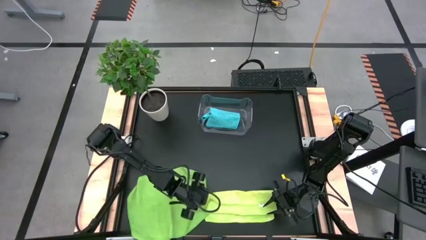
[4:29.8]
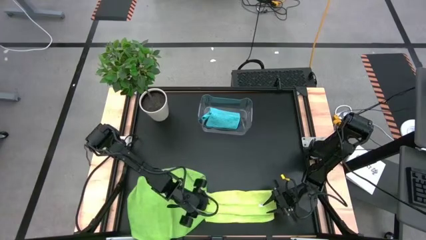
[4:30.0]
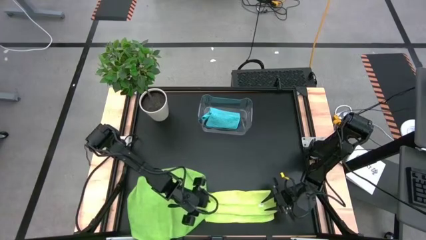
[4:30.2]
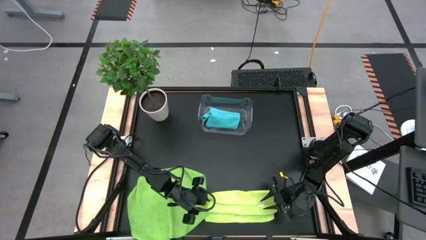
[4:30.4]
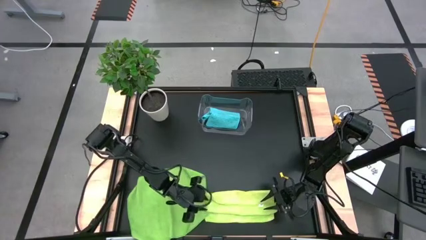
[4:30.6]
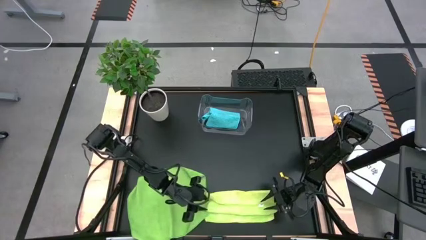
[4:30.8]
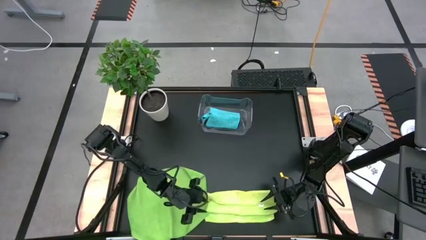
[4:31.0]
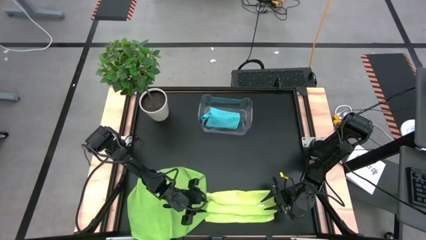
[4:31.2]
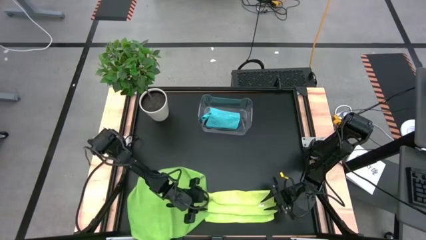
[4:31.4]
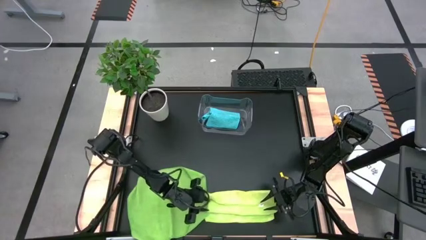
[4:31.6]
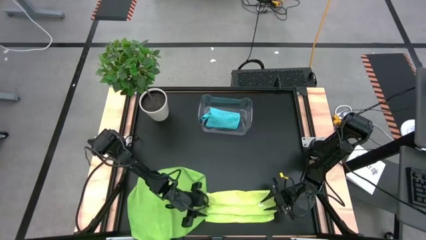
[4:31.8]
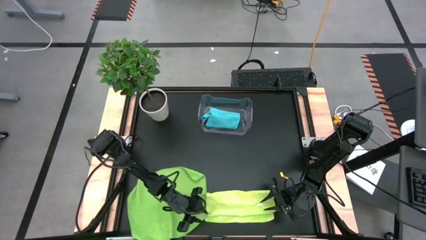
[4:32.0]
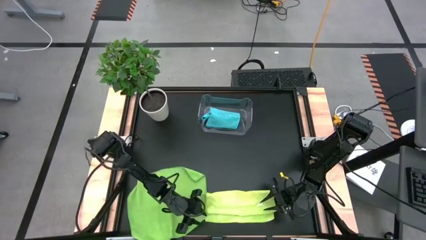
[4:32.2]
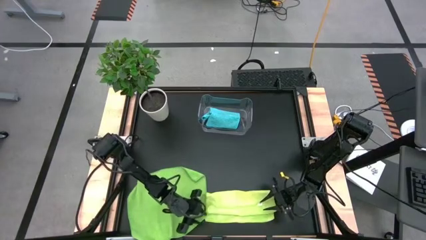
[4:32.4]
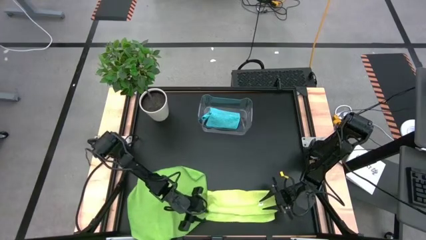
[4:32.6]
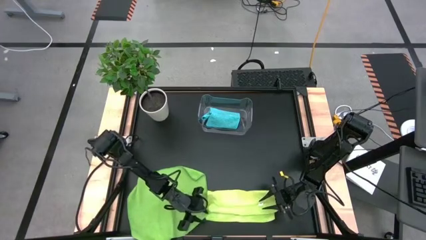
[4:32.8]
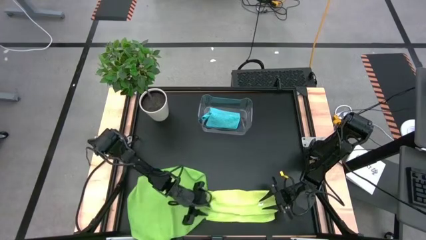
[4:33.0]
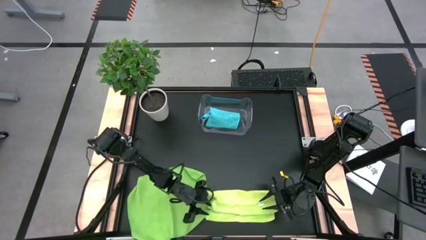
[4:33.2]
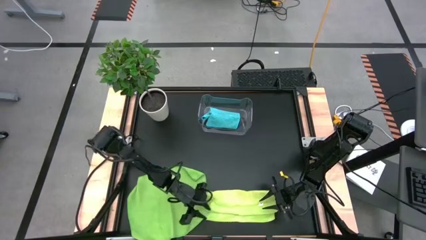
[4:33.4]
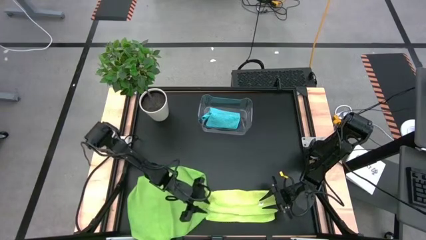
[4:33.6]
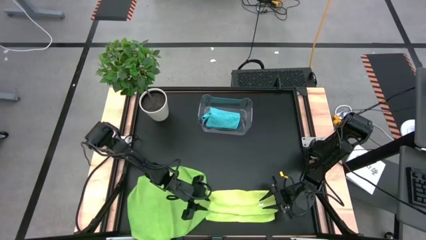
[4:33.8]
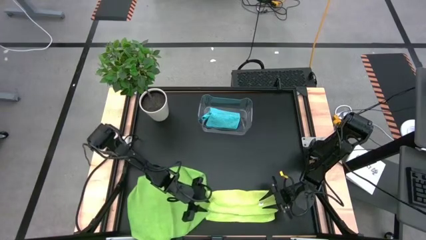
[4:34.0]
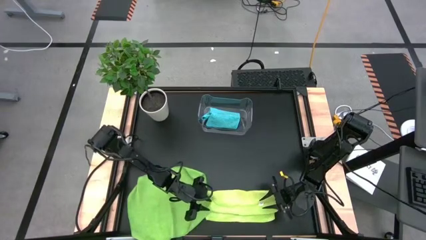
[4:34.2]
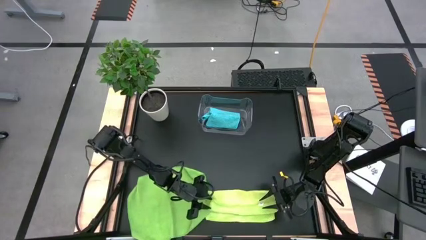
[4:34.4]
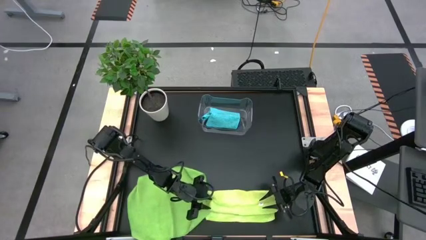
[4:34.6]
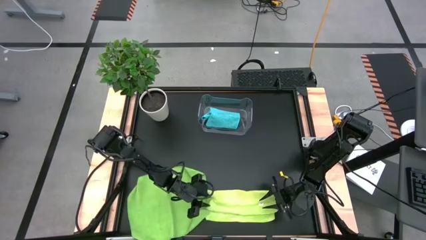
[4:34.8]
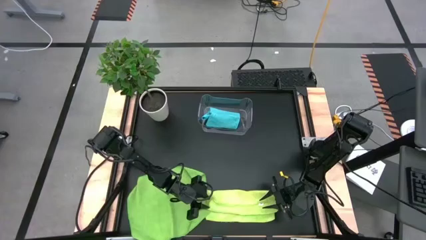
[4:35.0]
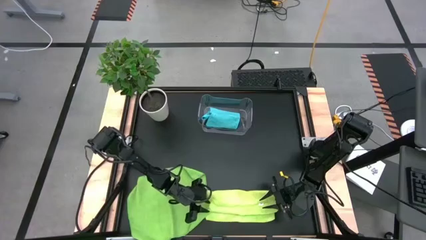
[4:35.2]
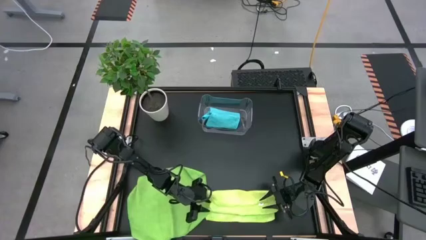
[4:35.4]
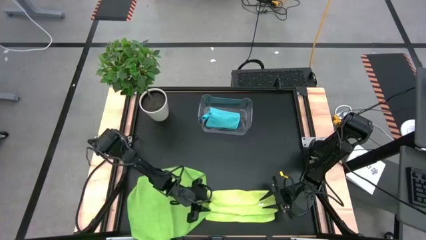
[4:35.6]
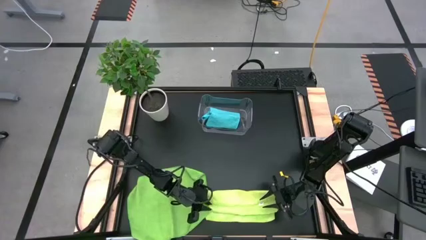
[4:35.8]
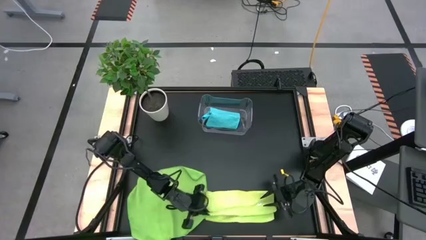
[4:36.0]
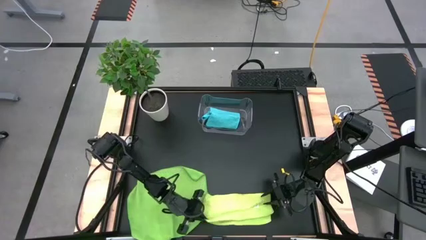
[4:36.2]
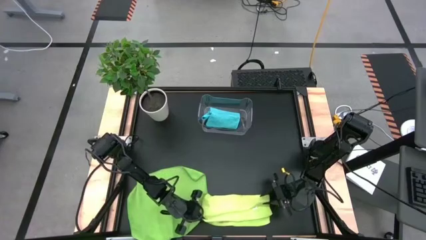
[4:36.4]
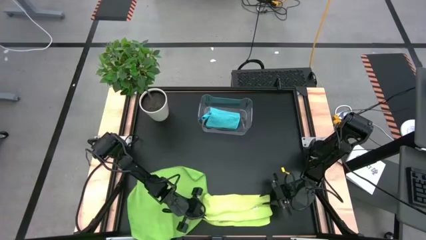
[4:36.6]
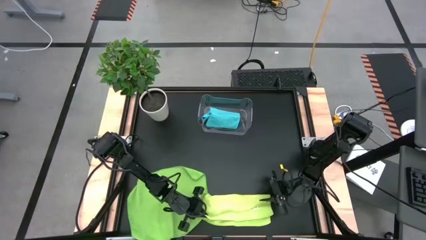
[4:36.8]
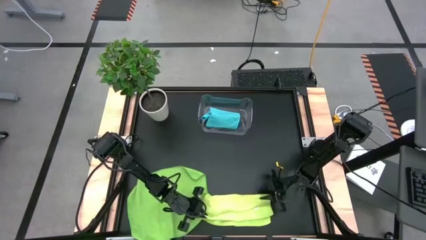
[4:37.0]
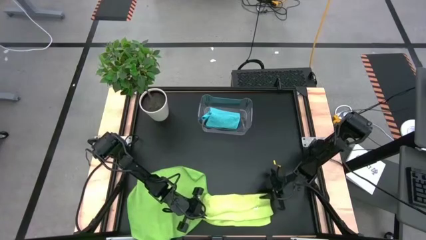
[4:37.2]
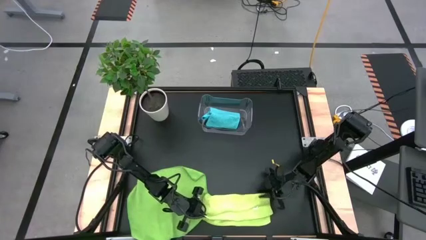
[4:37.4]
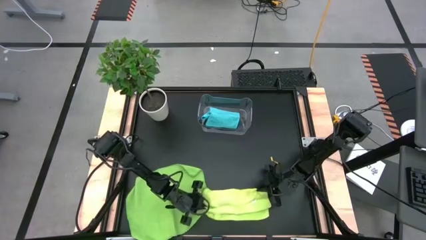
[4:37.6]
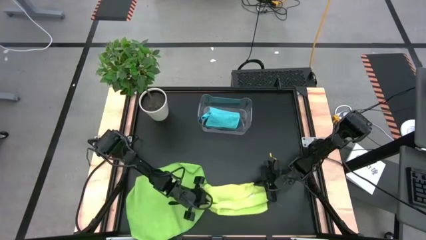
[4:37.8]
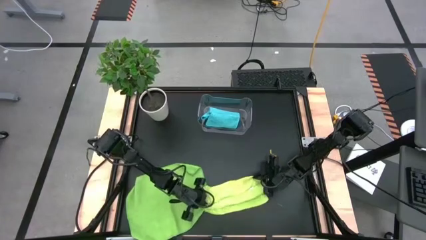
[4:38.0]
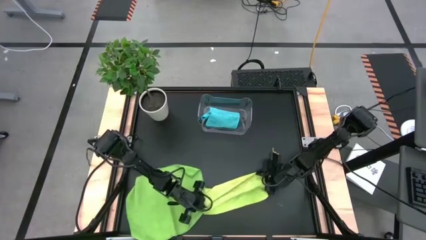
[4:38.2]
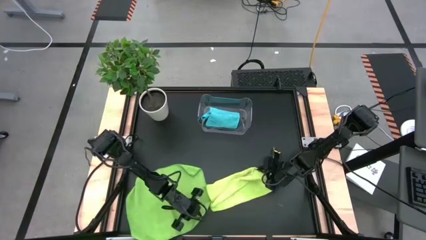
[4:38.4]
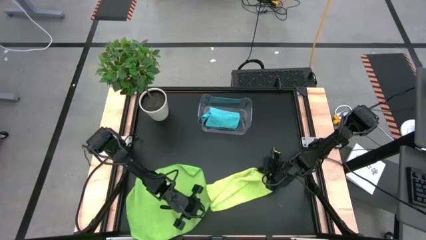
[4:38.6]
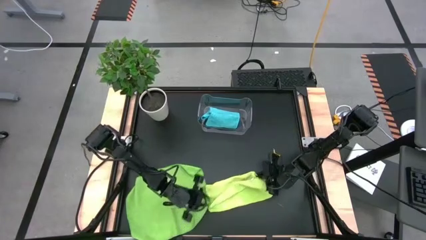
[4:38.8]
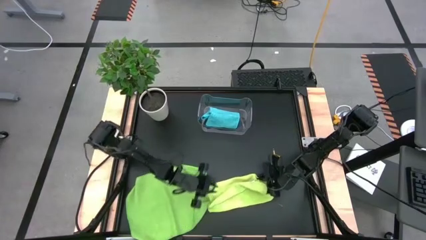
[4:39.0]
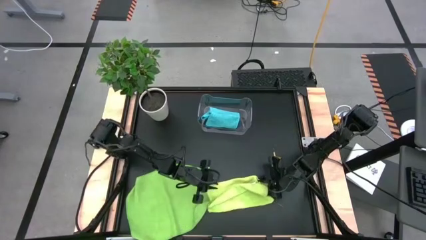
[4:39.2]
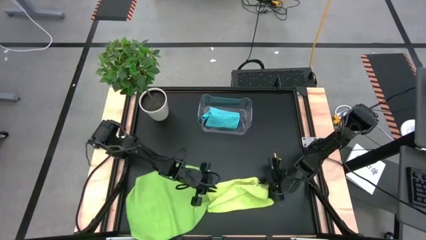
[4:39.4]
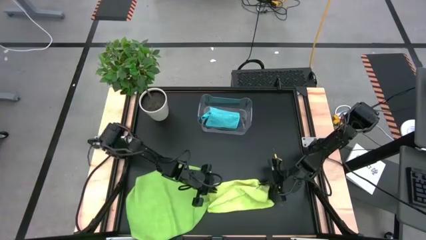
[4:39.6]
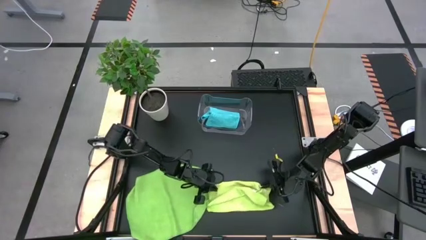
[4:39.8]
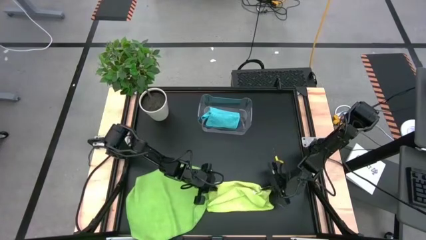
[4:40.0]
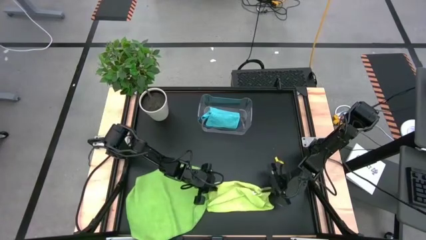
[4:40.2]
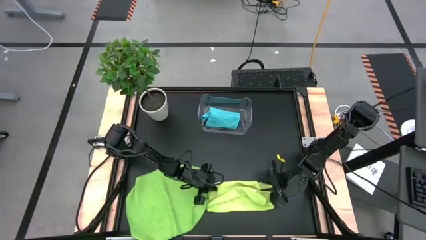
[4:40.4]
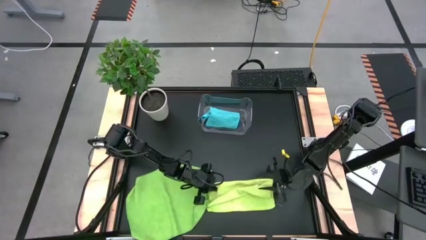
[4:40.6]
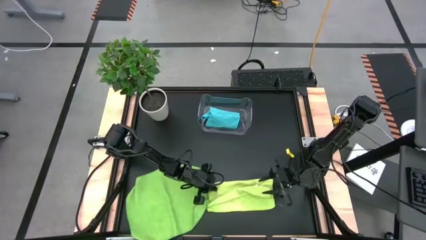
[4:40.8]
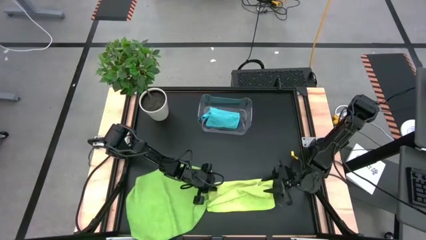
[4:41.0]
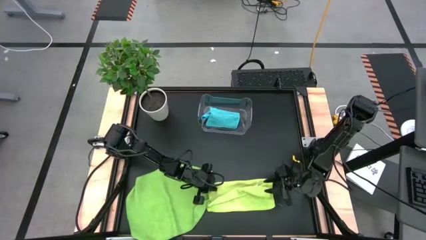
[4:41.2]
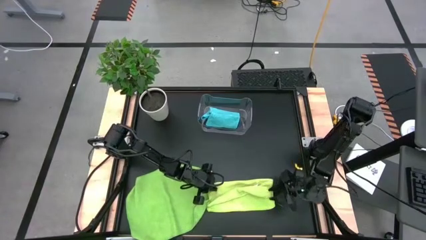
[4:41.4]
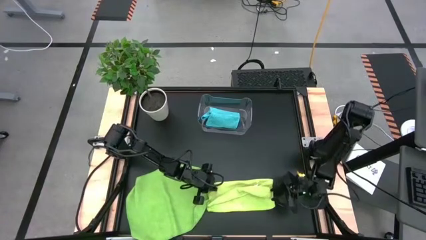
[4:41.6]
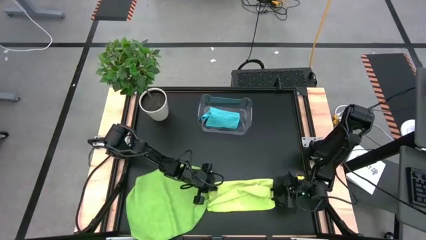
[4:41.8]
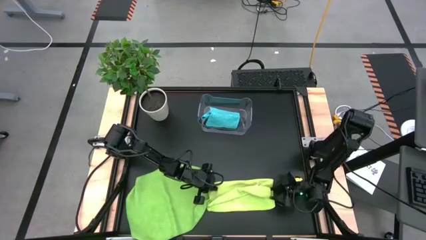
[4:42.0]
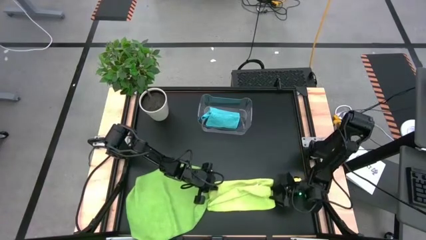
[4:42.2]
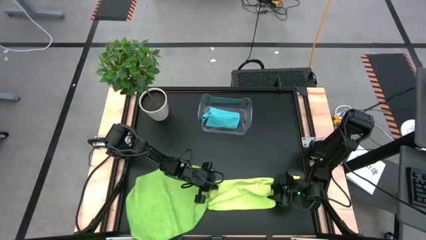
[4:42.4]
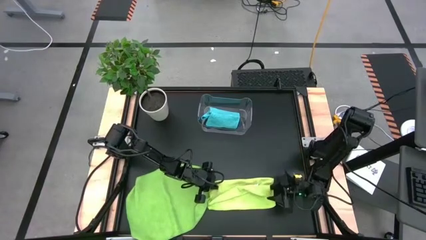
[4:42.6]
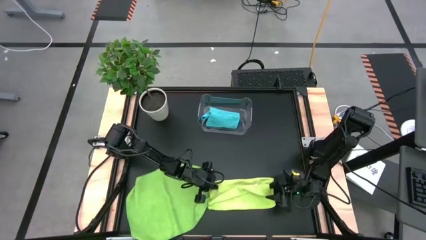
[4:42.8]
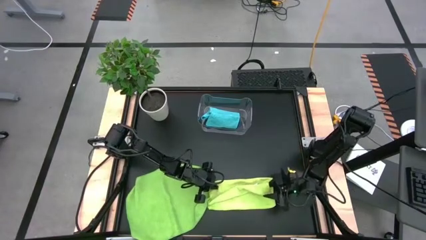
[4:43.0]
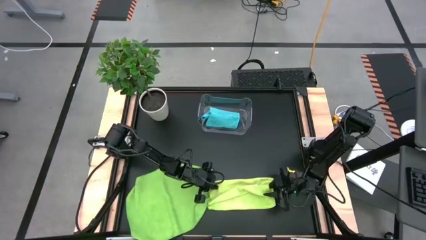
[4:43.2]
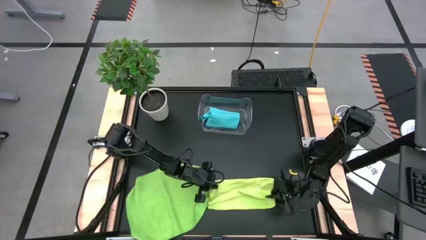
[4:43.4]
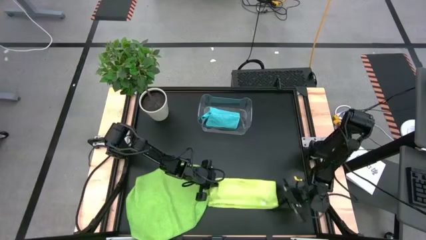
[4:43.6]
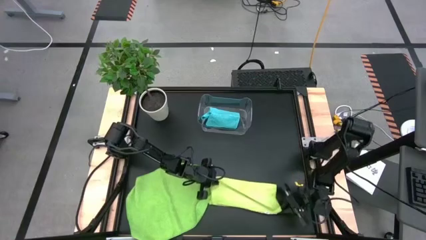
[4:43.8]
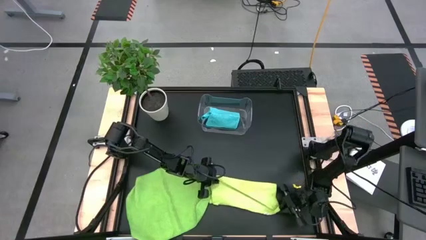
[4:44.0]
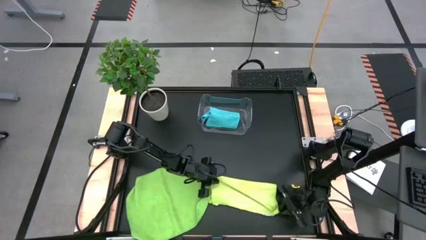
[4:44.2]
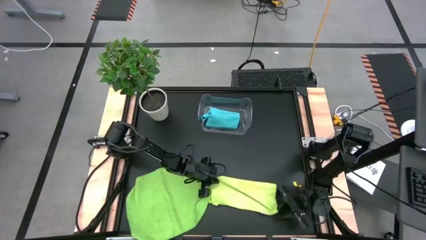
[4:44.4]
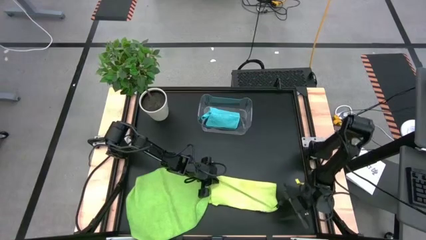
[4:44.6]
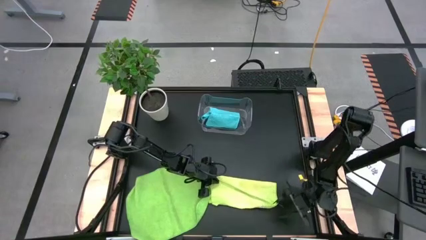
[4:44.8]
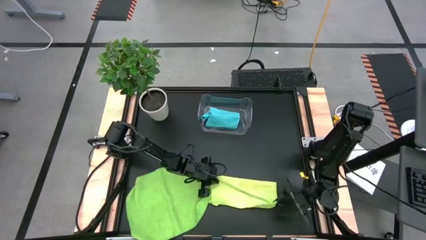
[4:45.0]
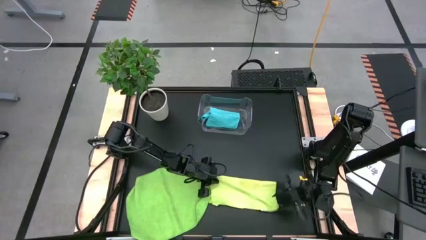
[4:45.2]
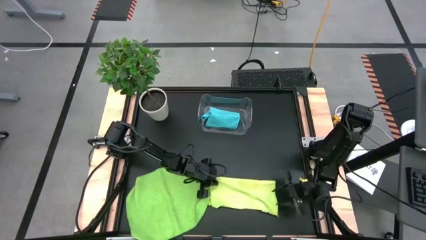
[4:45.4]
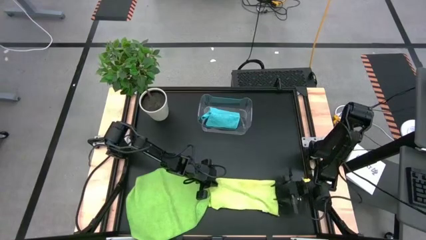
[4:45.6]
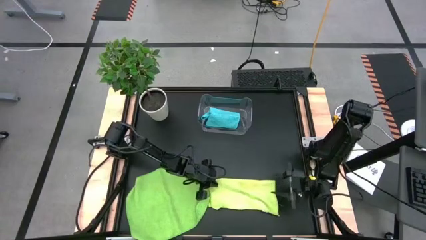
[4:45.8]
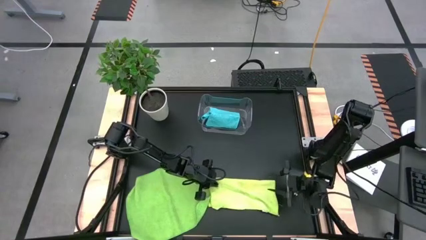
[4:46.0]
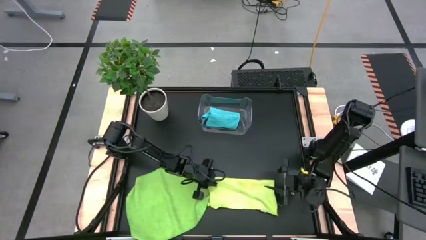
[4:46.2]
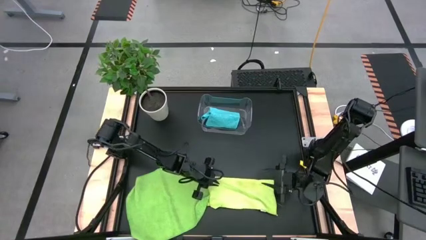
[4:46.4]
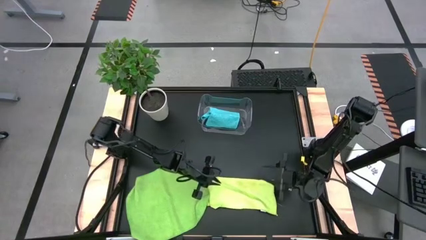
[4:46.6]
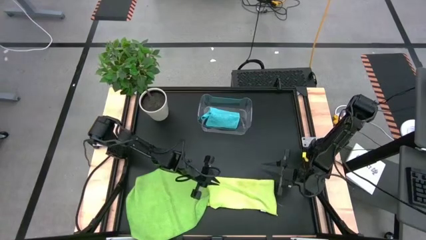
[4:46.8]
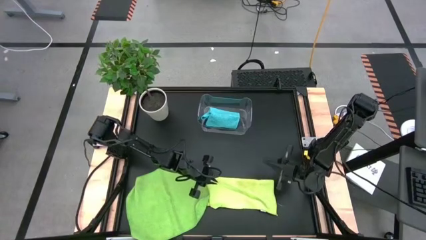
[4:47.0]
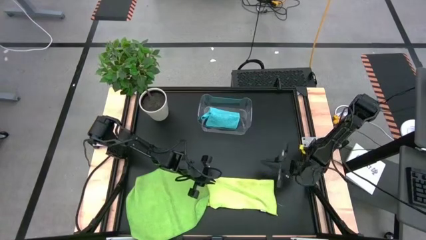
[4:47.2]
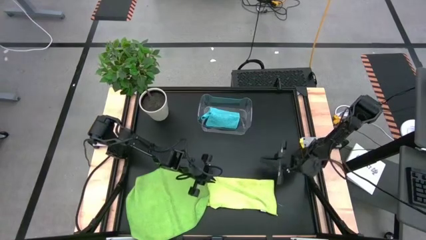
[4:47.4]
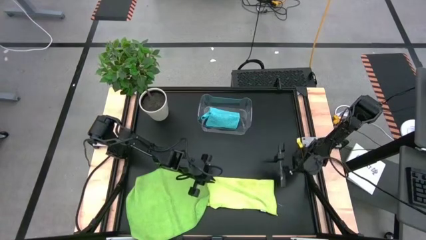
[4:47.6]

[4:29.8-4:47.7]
Task: Fold microfiber towels
Fold the light green towel
